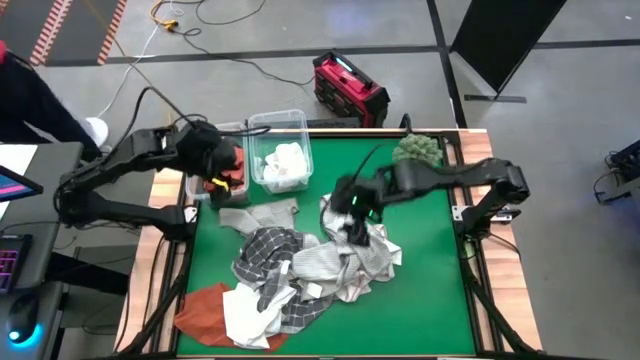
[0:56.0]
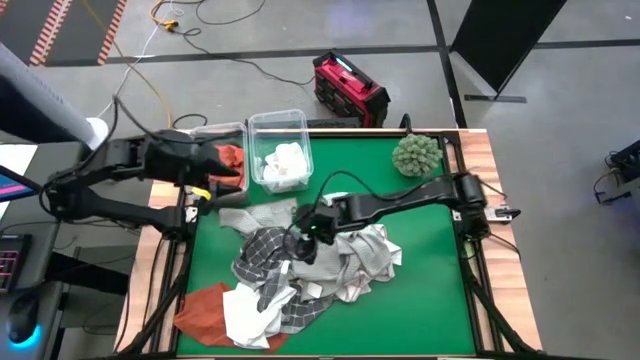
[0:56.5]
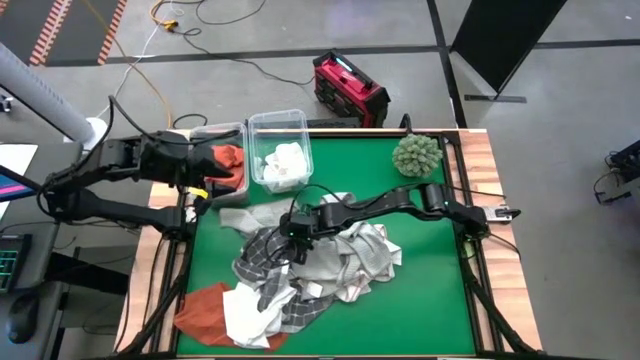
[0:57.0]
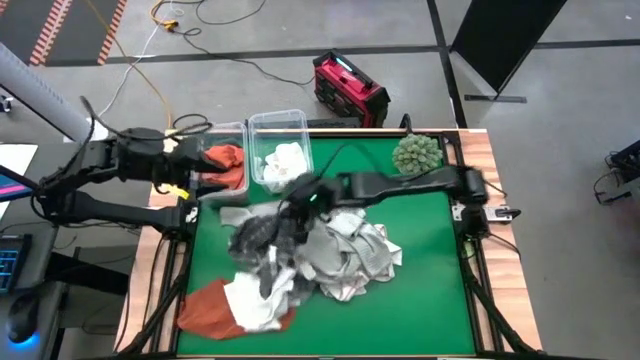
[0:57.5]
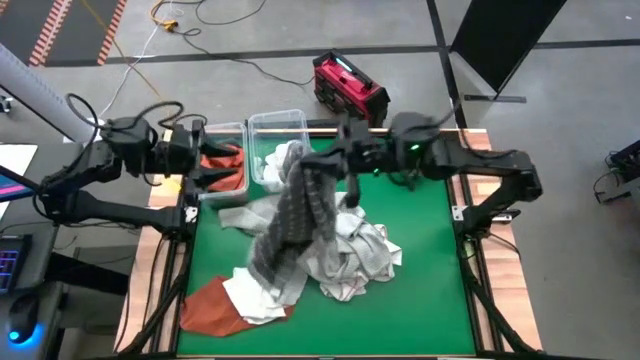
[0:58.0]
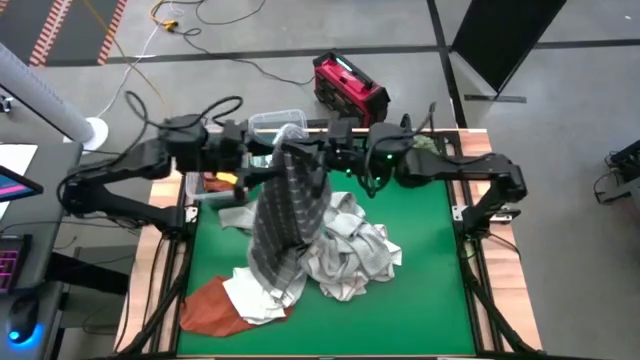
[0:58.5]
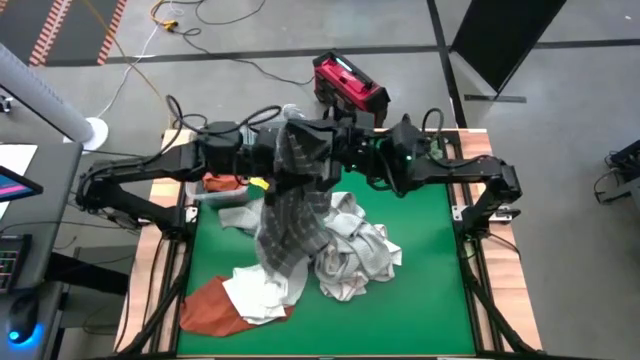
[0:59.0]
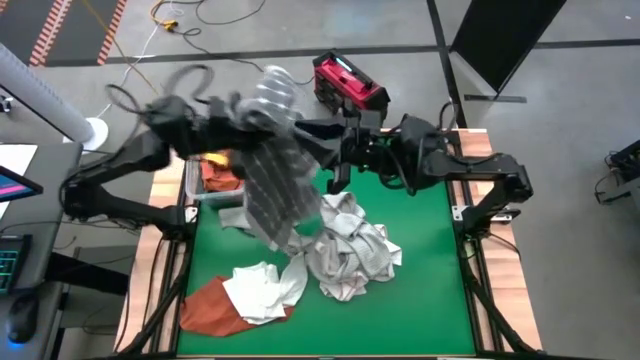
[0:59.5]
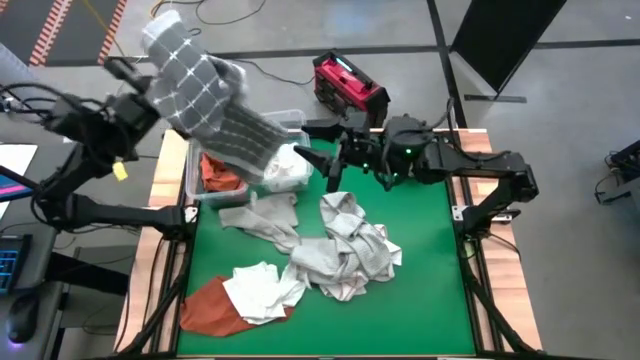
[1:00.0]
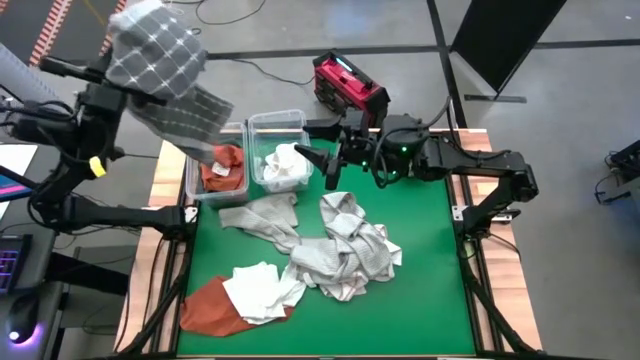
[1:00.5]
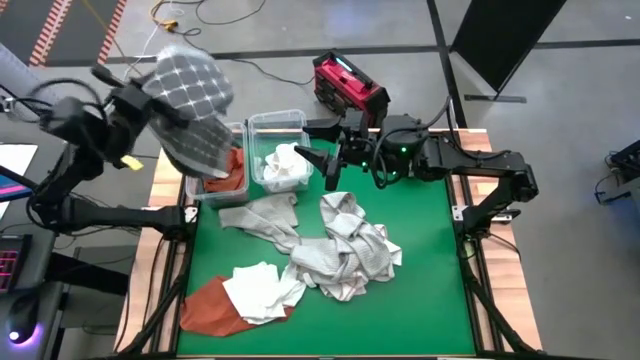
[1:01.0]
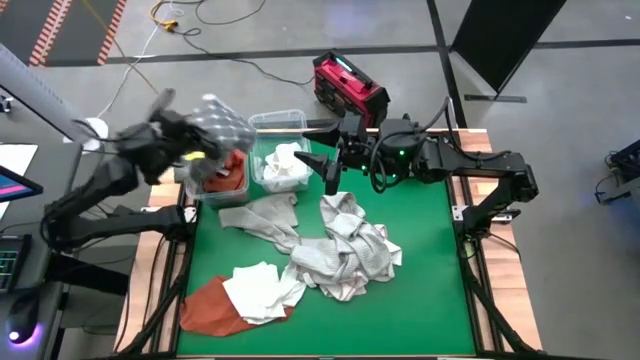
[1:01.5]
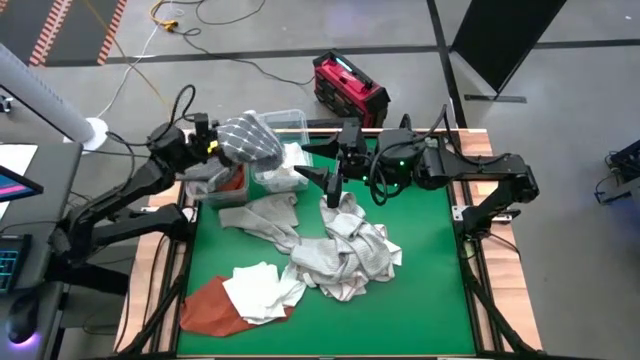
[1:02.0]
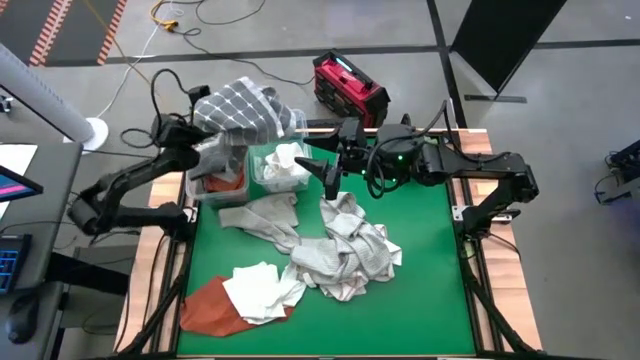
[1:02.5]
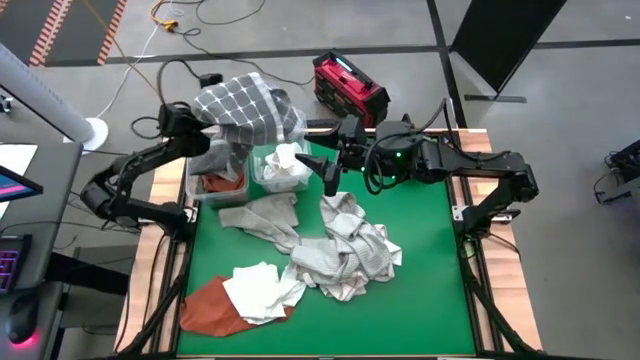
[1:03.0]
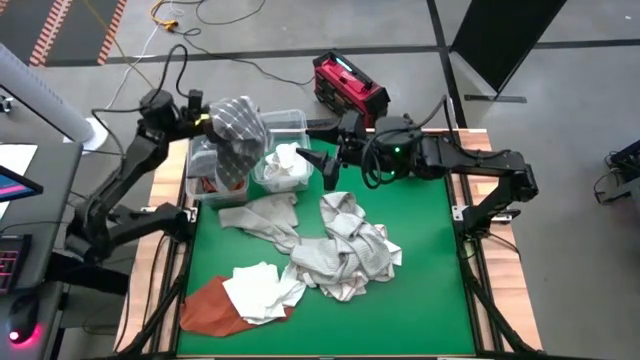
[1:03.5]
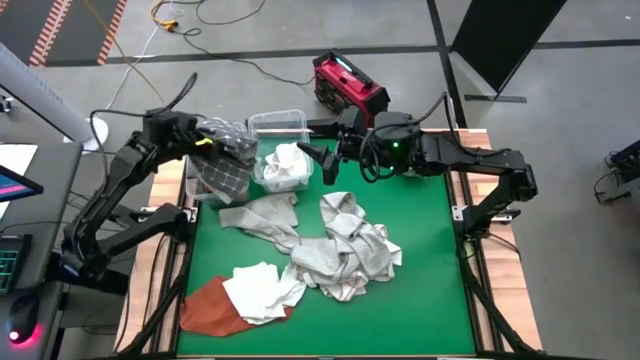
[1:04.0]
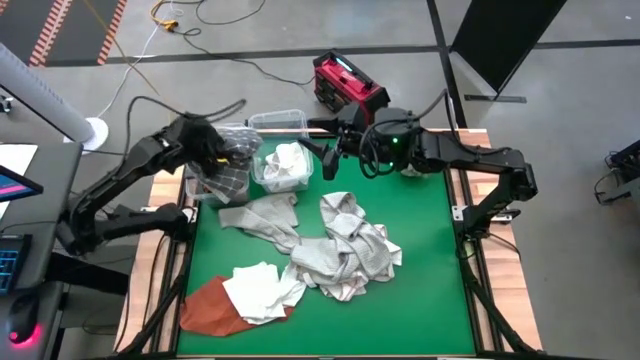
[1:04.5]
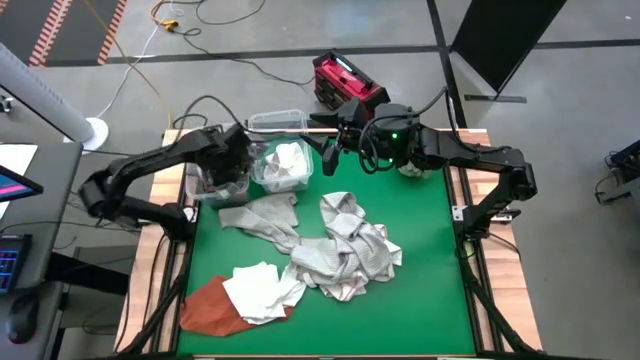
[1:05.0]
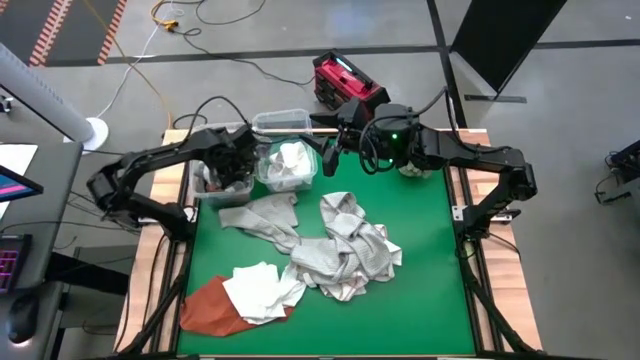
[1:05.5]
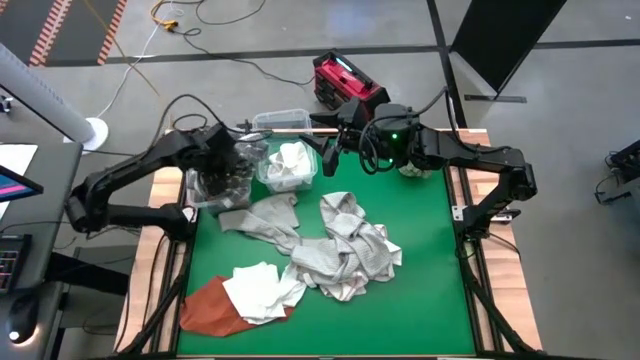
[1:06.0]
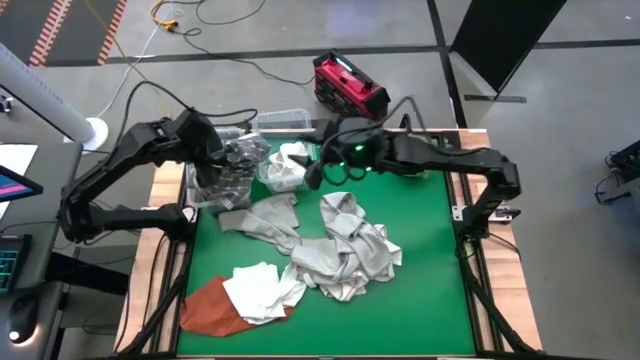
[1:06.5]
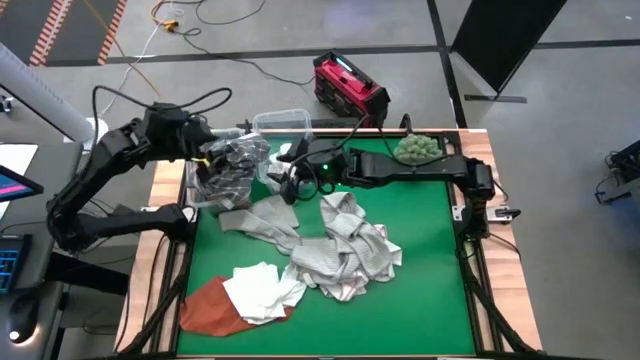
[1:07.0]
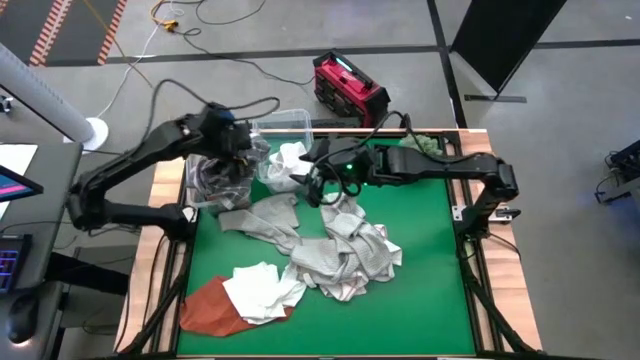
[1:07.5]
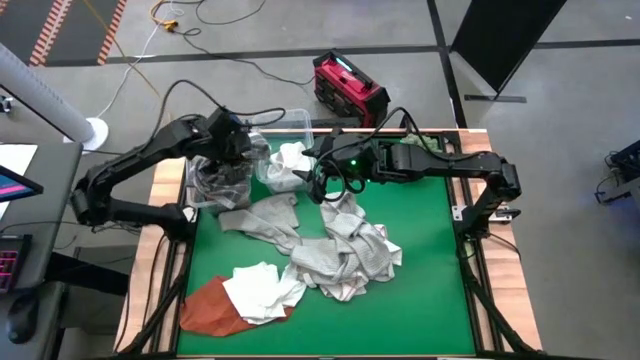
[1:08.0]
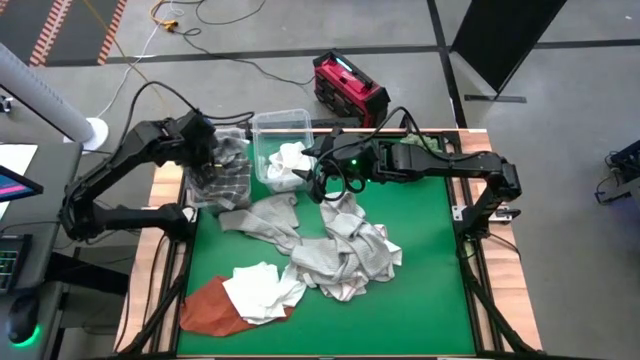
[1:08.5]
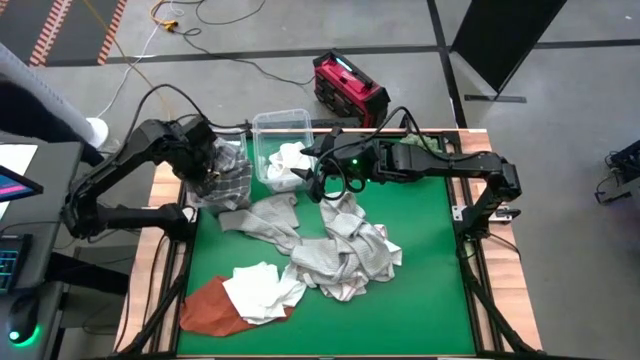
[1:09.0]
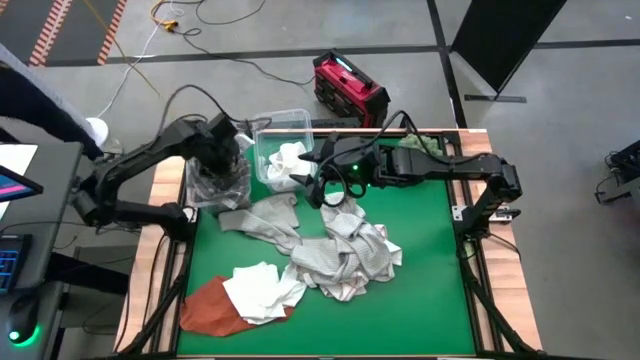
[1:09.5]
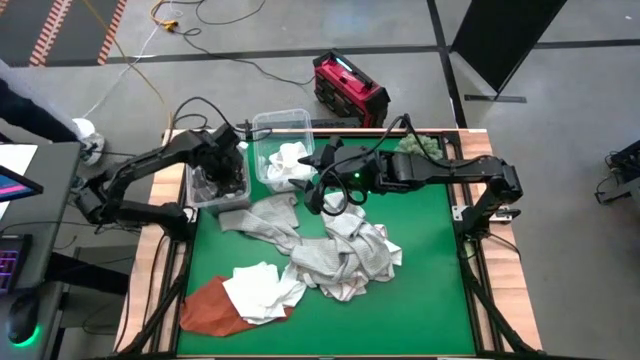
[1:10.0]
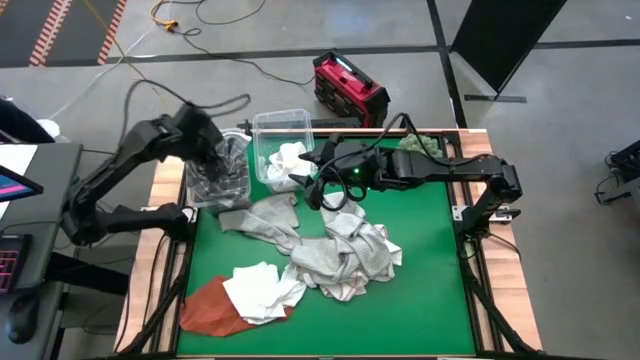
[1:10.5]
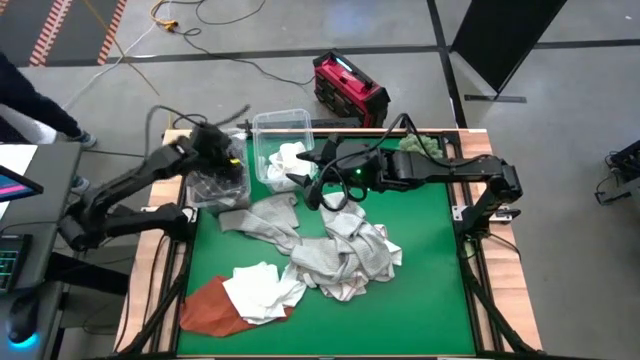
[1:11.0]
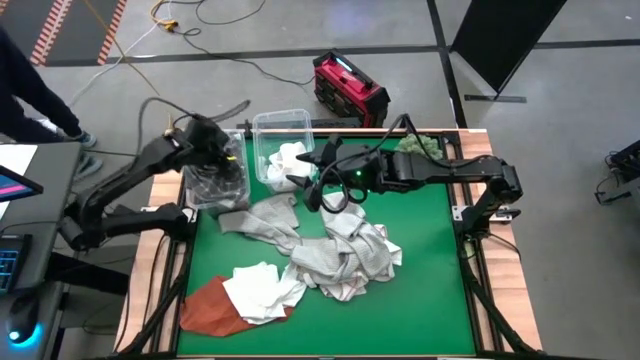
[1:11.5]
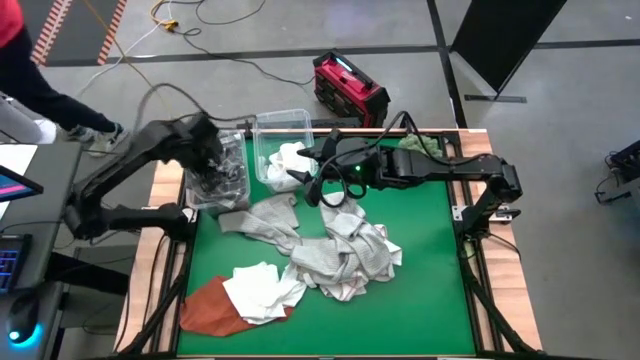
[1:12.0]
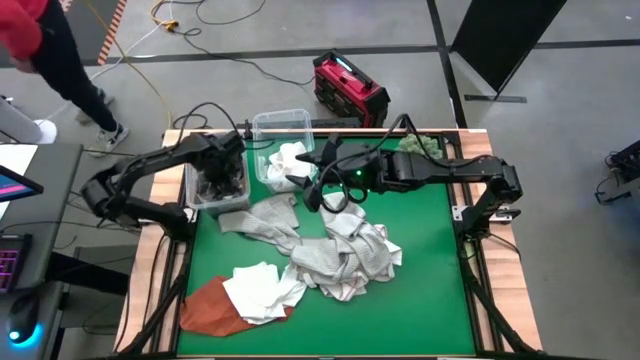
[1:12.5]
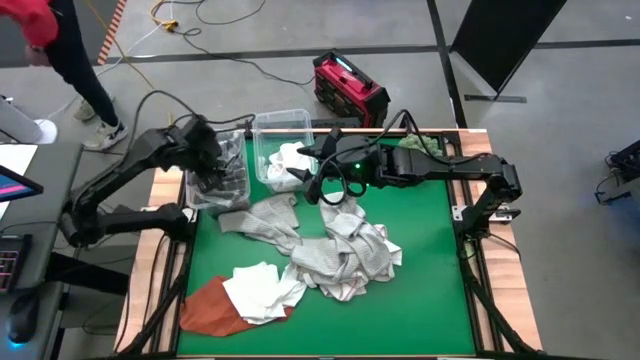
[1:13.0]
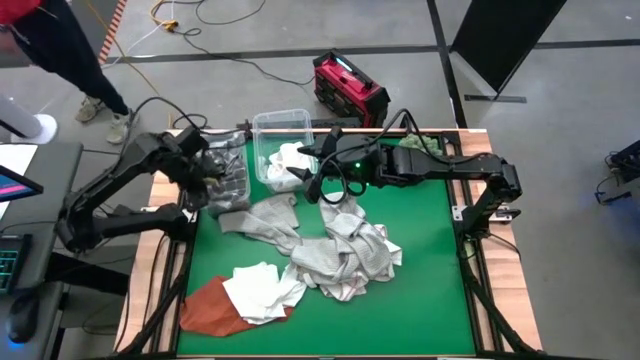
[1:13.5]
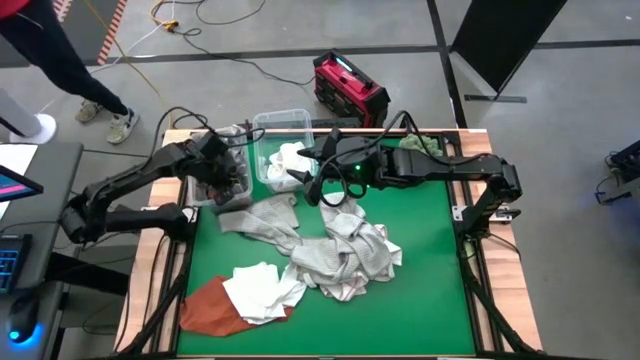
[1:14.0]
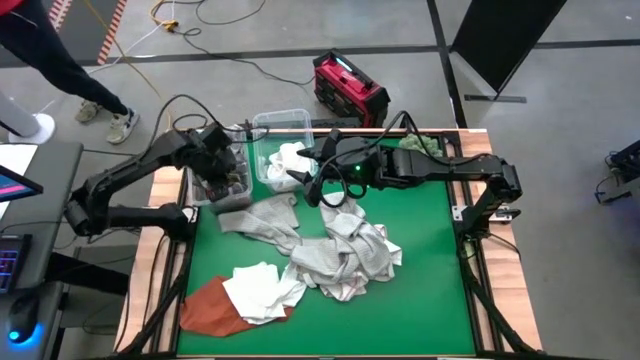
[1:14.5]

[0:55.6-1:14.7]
Task: Sort towels by color in basket
Put the gray patterned towel into the left transparent bin

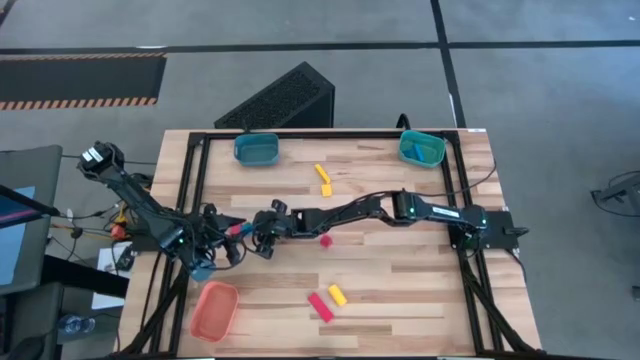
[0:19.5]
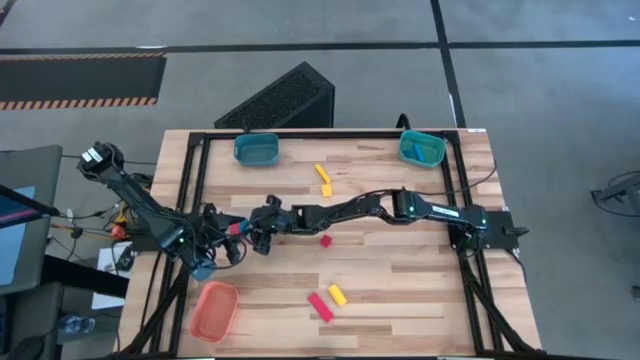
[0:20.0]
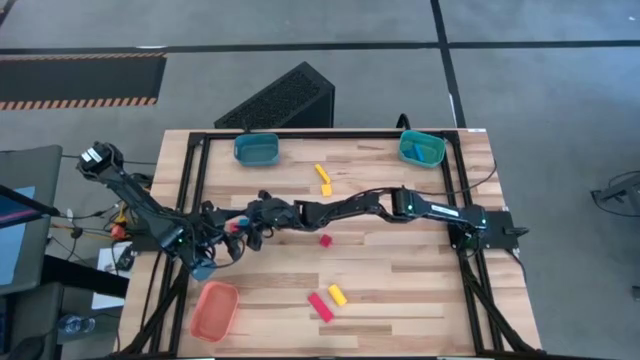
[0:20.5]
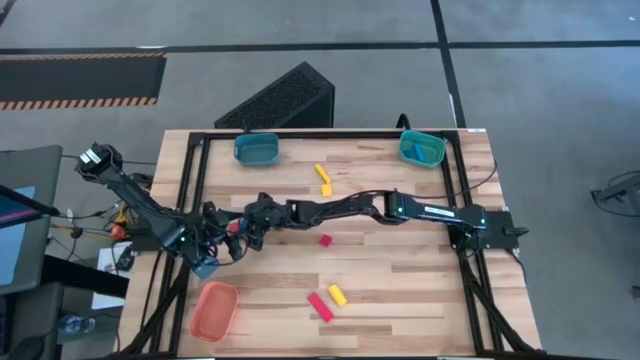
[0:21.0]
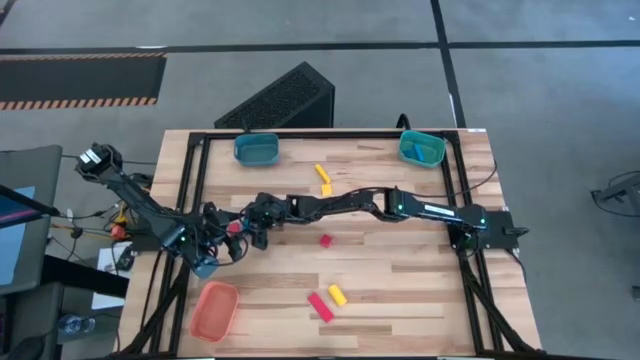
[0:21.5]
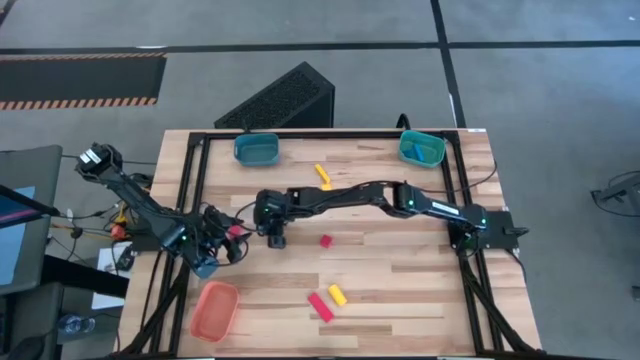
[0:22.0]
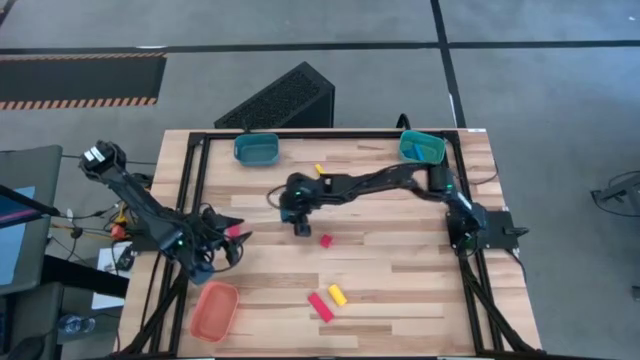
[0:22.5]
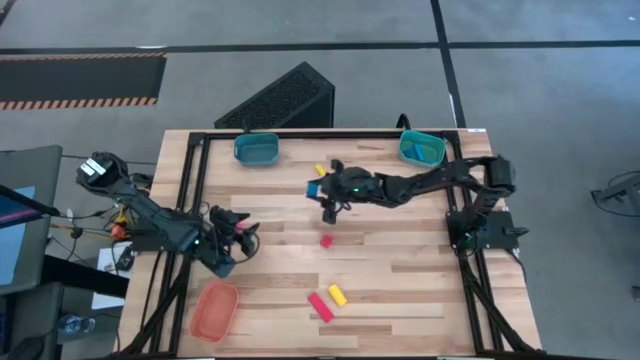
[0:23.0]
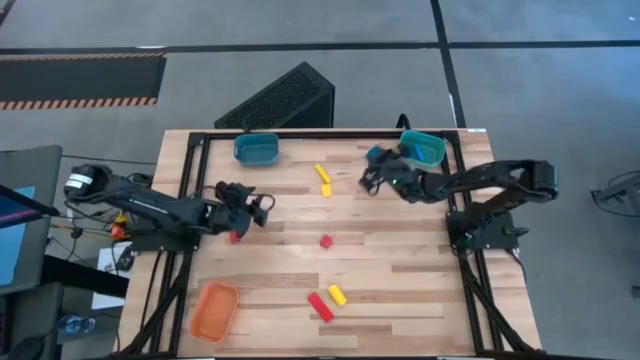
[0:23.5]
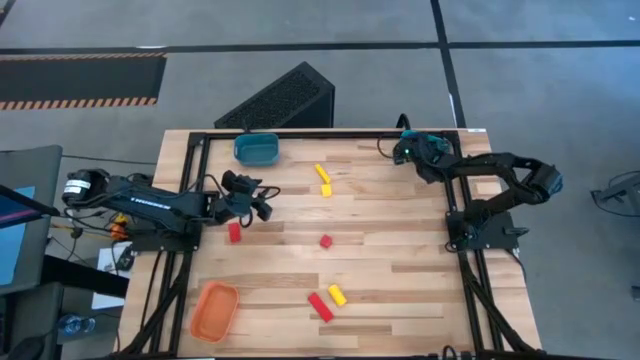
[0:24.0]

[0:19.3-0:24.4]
Task: Sort & place blocks by color
Put the blue block into the green bin
